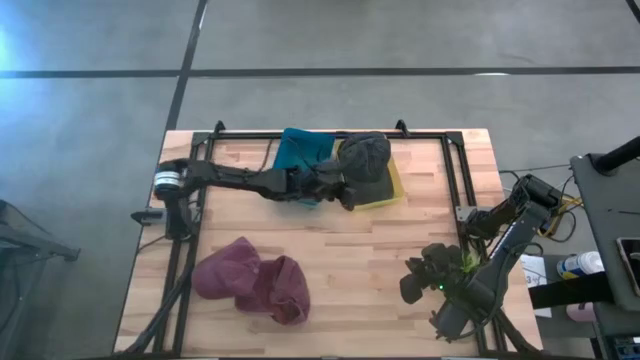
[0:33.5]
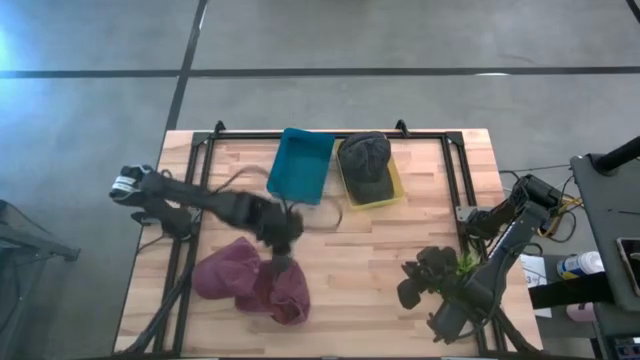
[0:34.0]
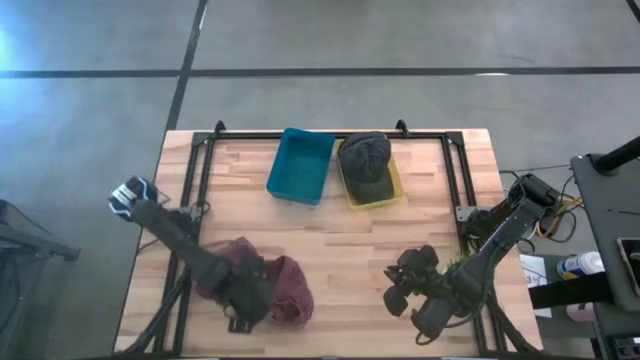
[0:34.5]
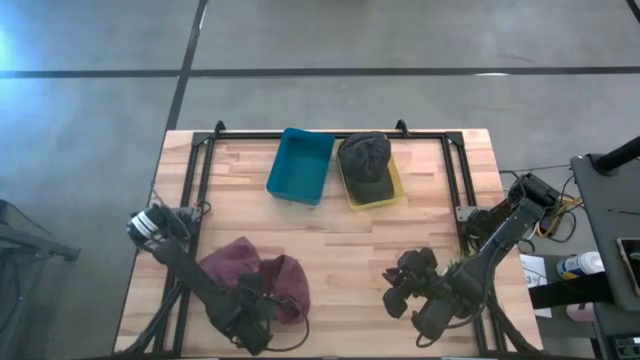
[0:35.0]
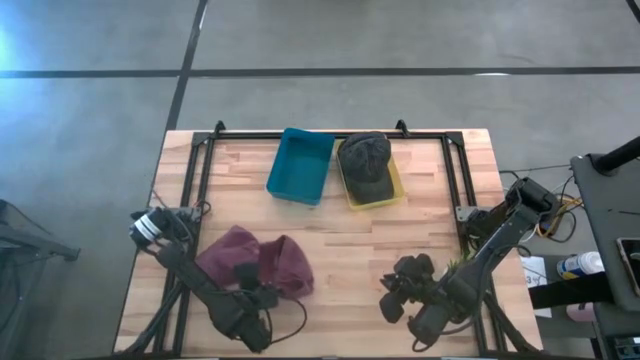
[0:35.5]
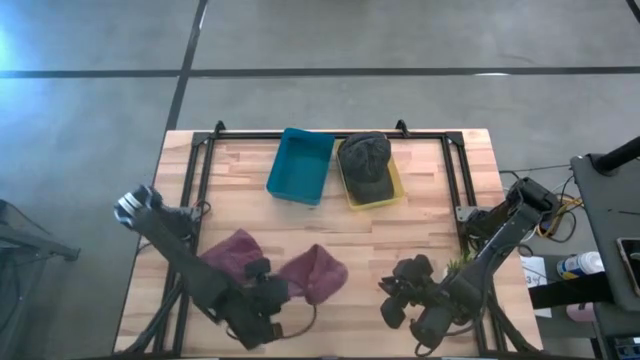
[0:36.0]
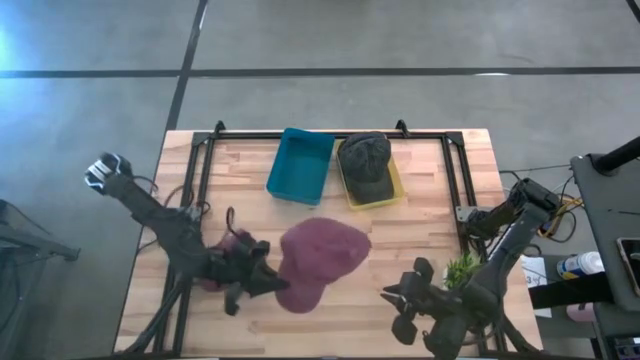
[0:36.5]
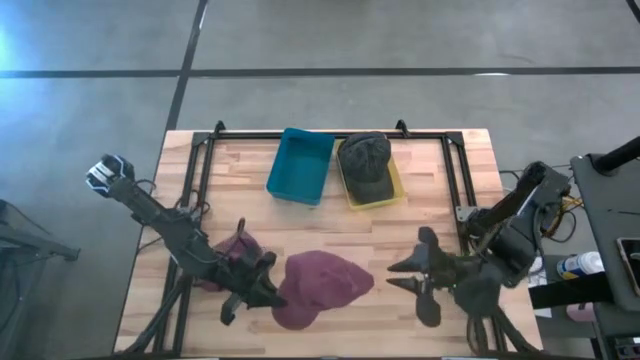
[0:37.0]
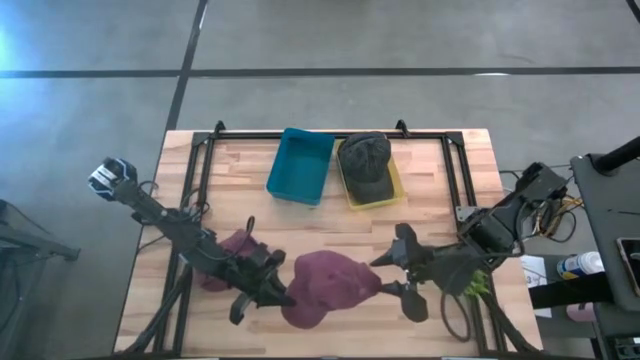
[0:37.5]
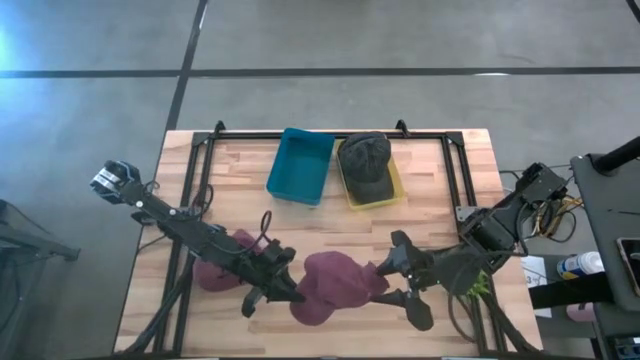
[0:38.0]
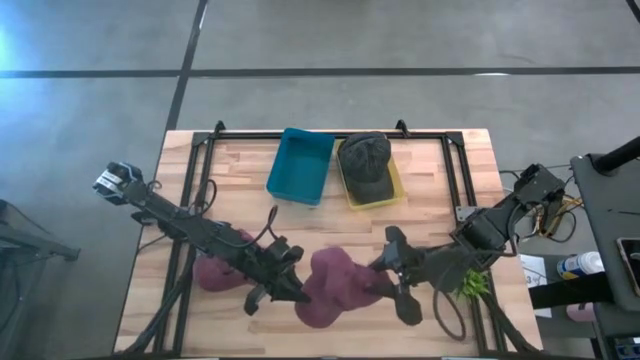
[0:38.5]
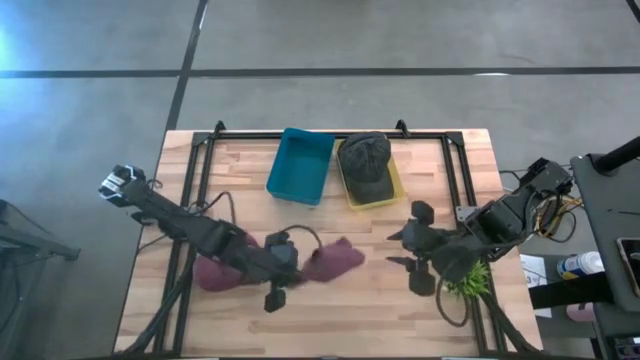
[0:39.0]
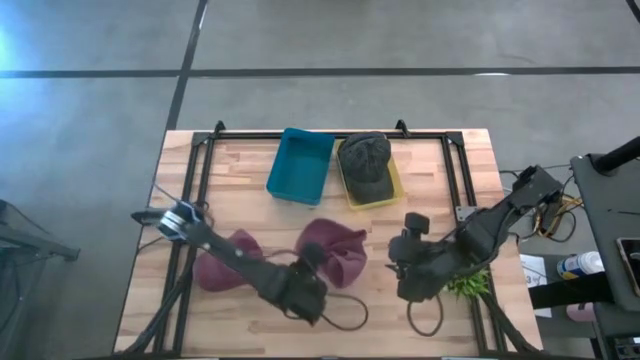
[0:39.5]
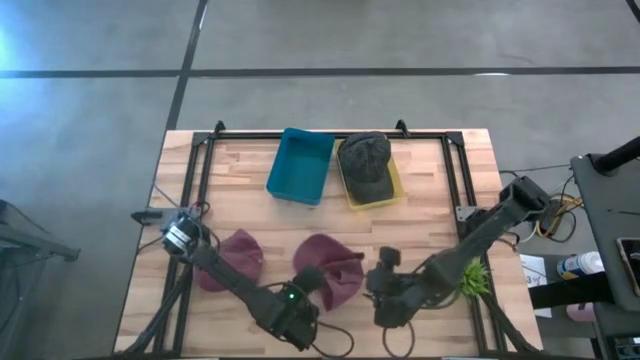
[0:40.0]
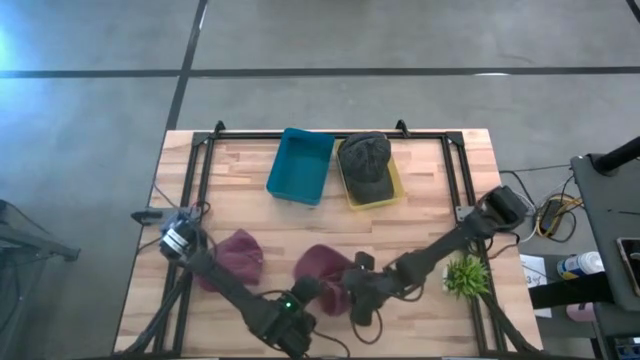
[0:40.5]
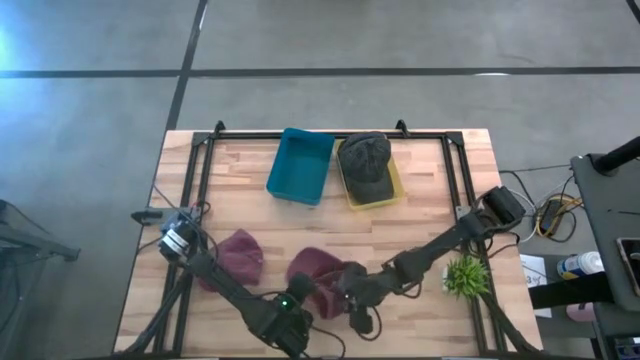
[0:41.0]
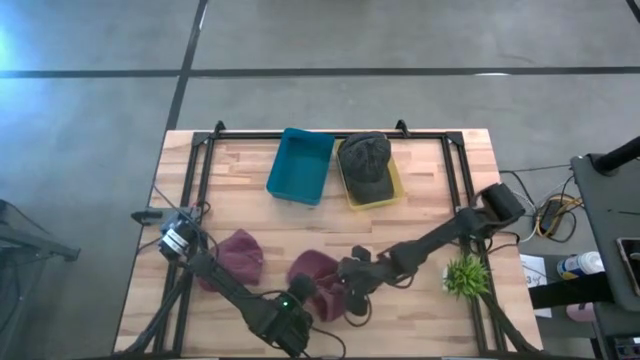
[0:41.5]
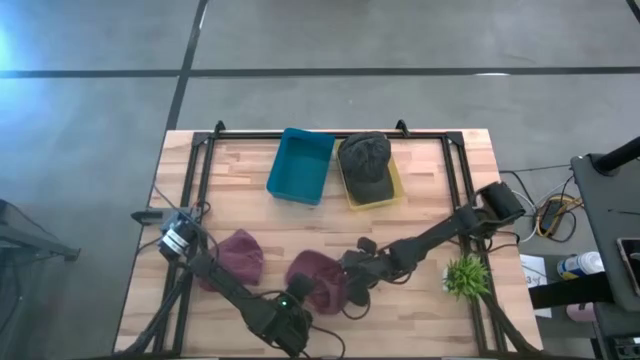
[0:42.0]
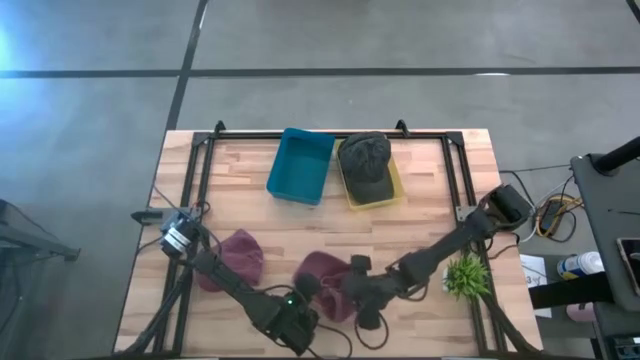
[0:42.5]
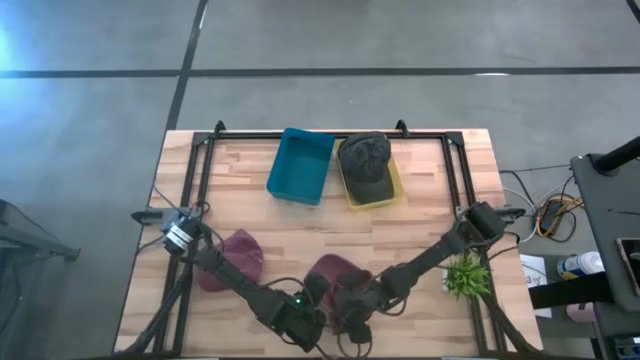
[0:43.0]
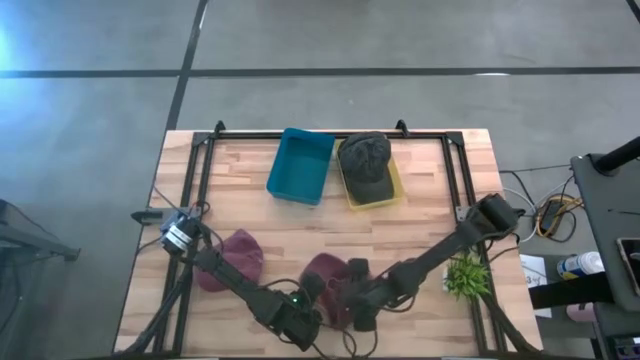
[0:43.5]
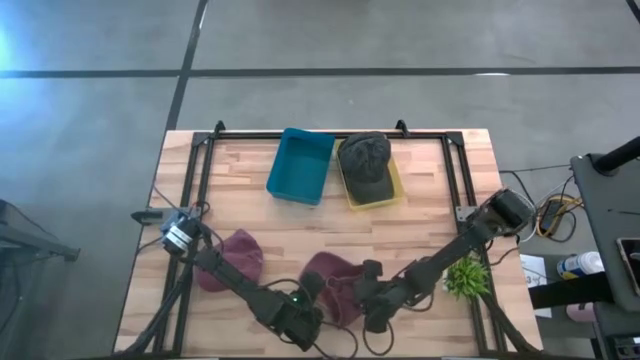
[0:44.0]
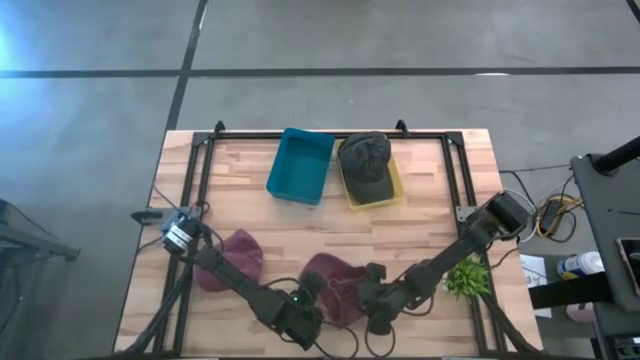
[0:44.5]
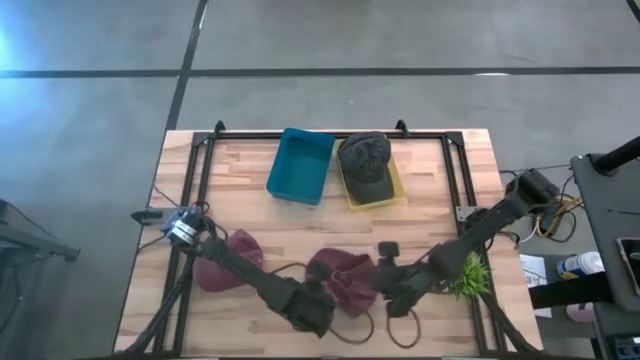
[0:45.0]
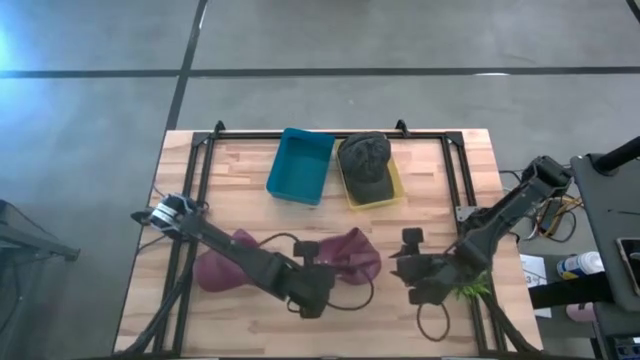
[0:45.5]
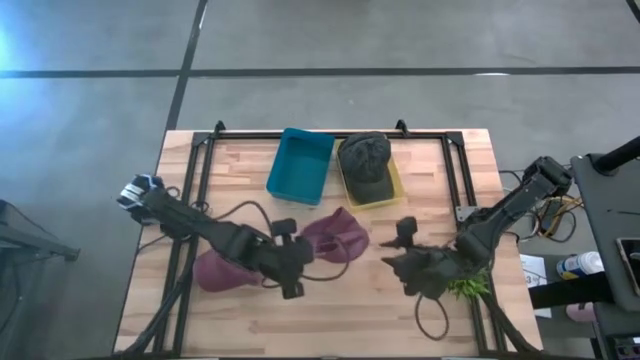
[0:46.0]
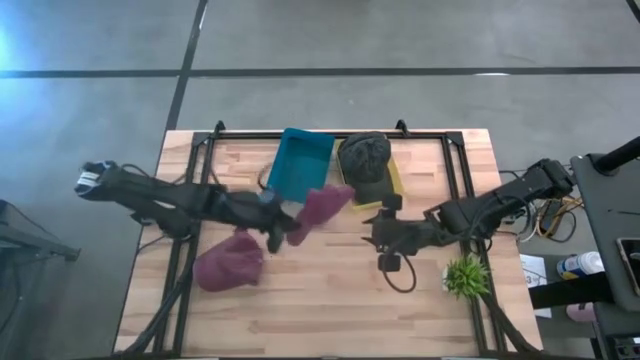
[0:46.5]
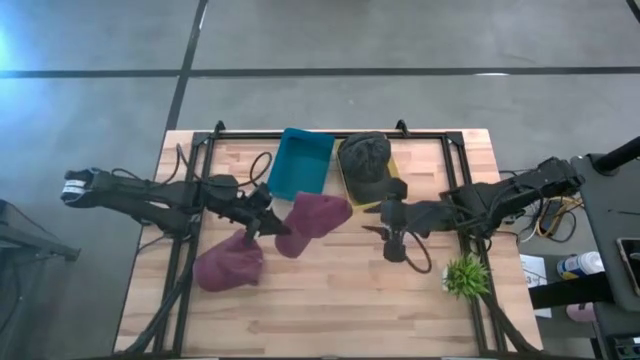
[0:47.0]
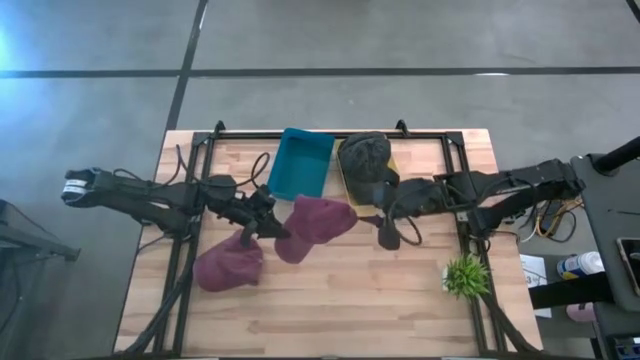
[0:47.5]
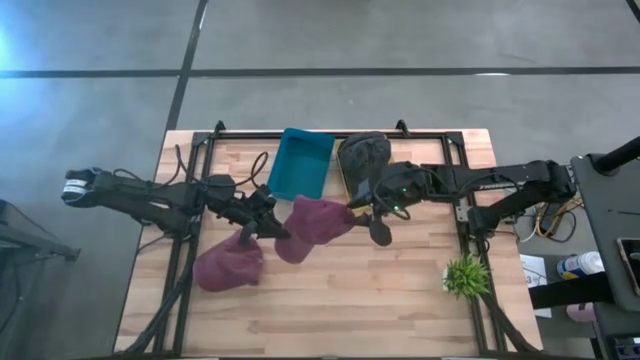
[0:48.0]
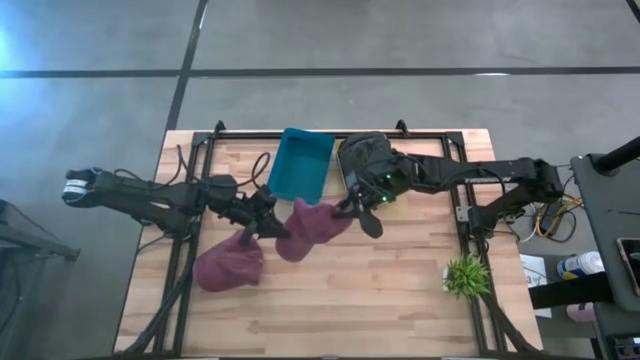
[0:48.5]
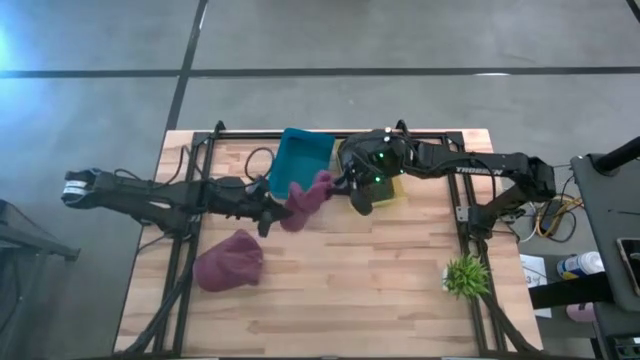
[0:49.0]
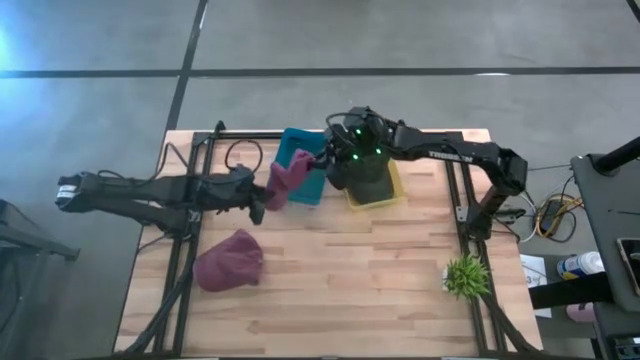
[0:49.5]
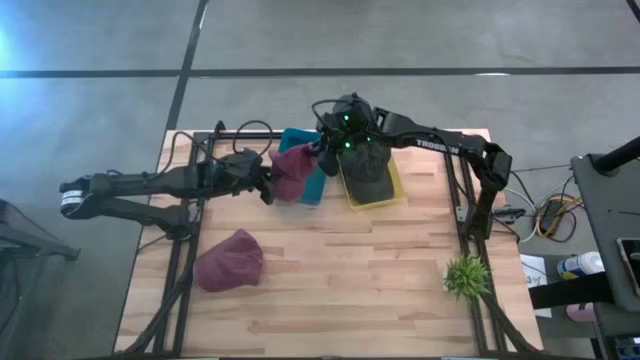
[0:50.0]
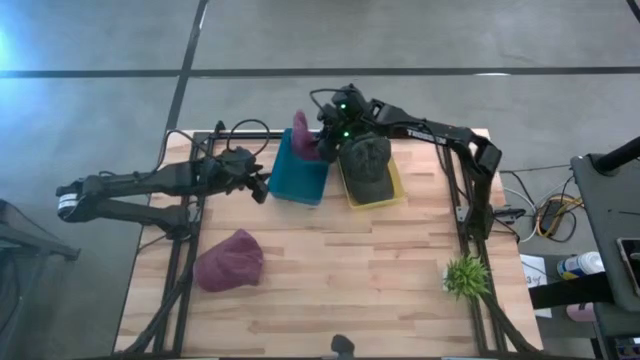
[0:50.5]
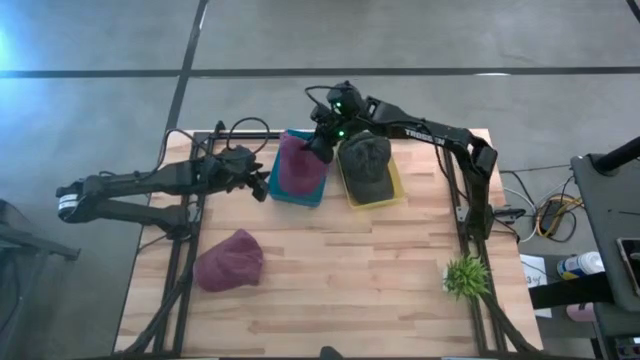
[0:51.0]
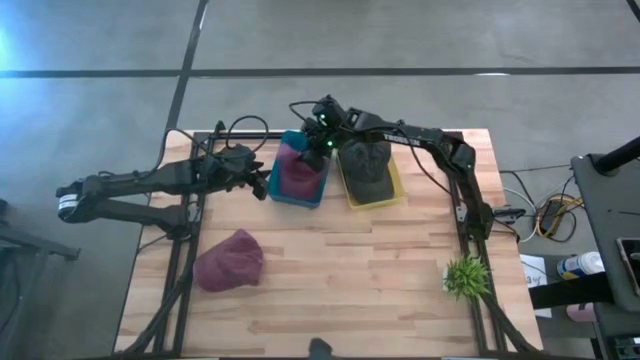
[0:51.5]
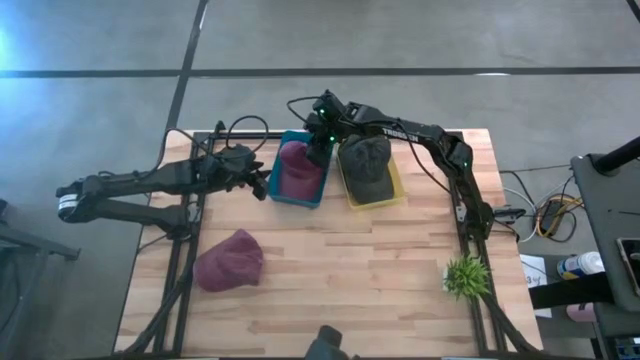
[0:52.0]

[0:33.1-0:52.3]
Task: Pick & Place hat
Put the right pink cap into the blue bin

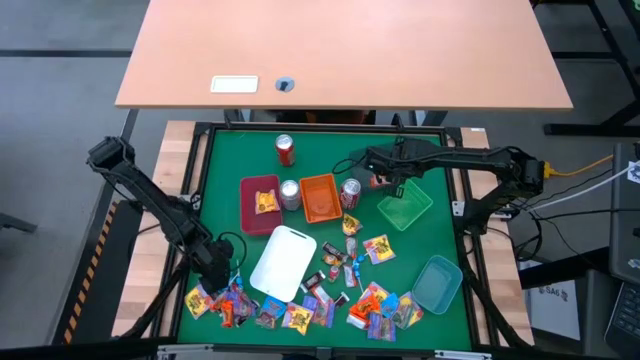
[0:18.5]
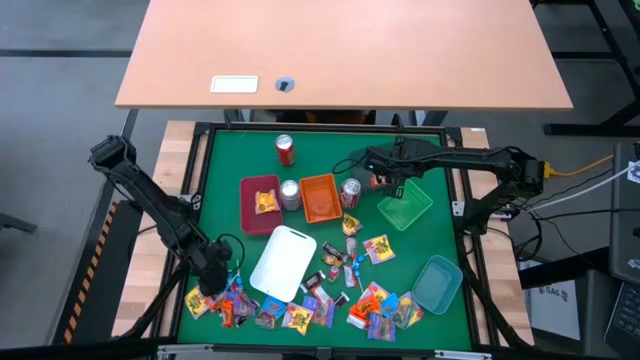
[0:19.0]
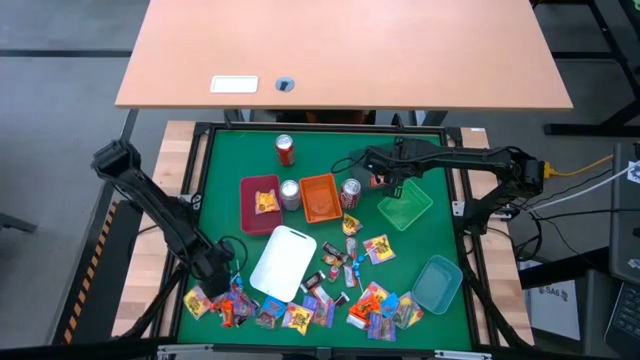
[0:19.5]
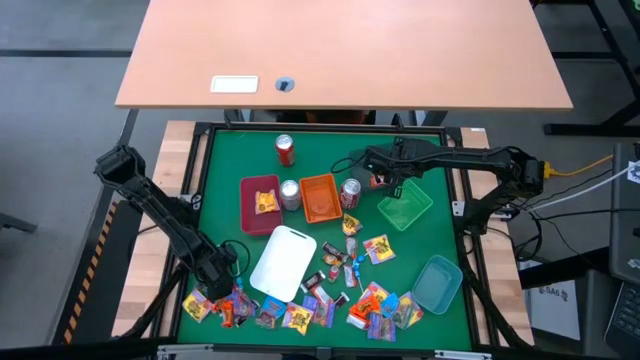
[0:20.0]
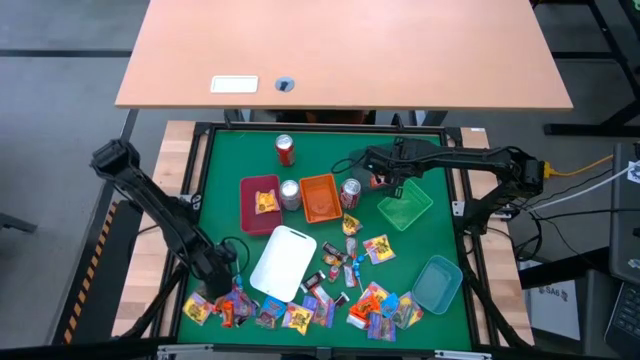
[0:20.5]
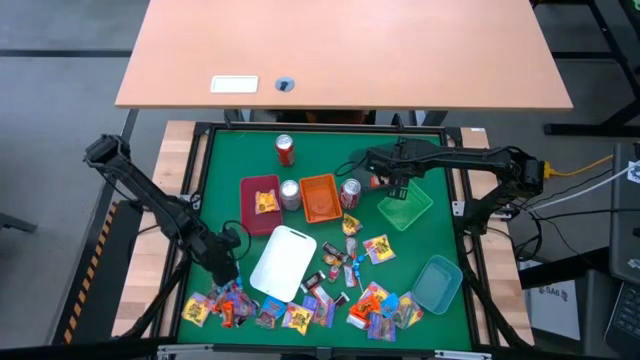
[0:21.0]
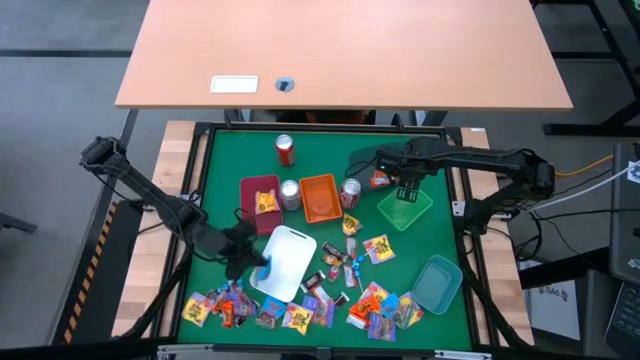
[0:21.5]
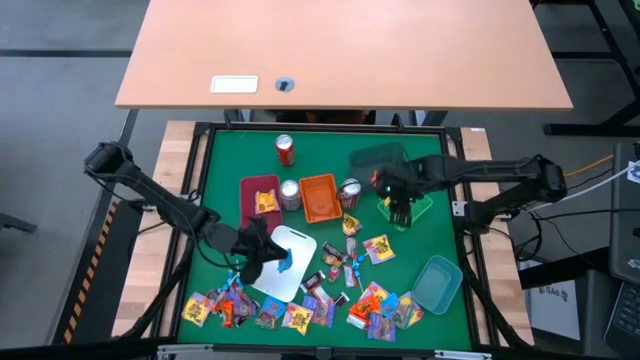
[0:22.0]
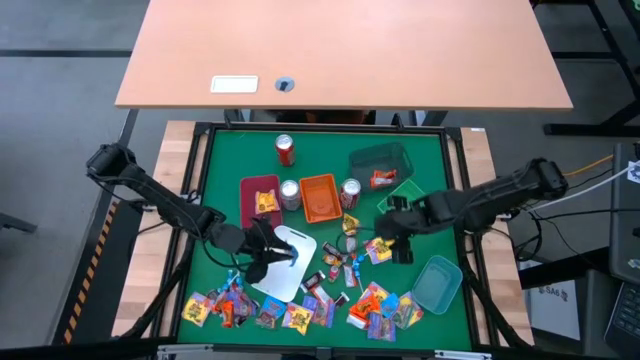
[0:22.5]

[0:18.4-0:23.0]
Task: Sort candy
Put the blue gummy into the white bin
